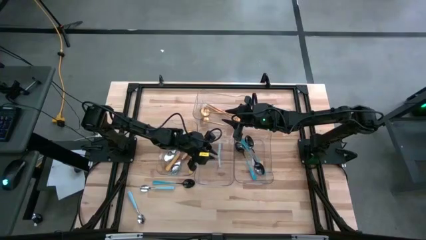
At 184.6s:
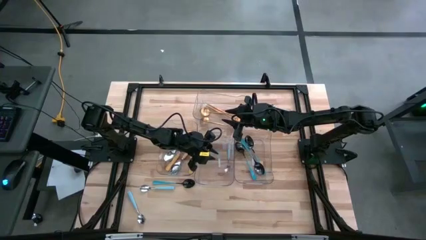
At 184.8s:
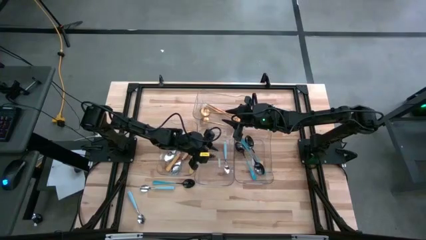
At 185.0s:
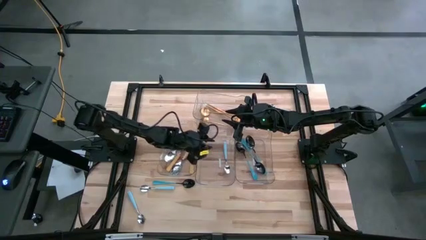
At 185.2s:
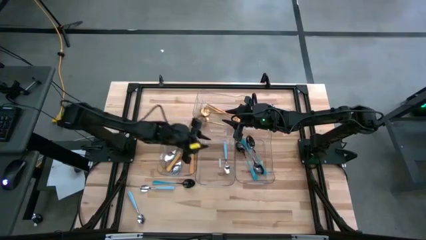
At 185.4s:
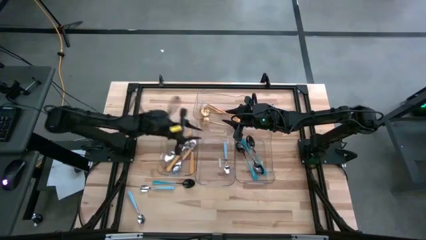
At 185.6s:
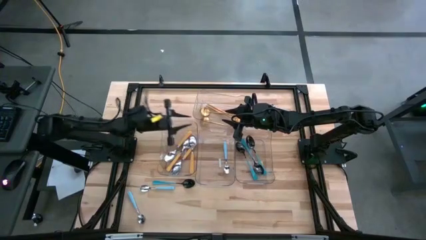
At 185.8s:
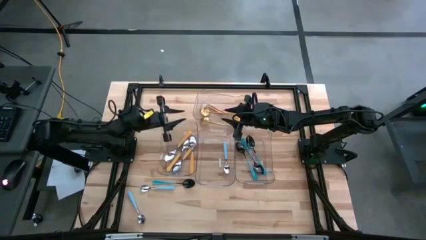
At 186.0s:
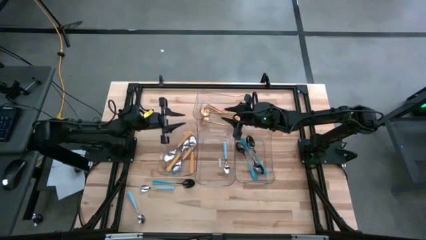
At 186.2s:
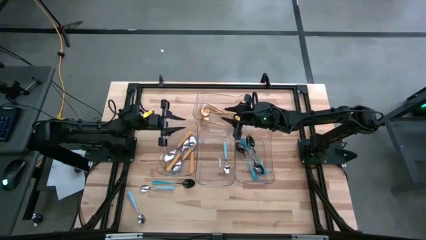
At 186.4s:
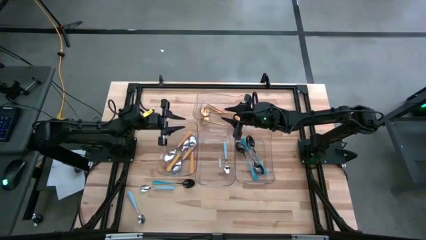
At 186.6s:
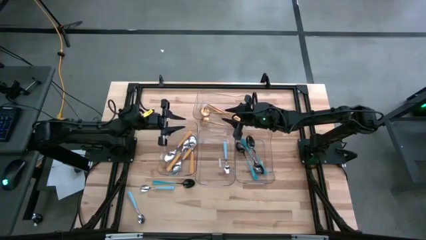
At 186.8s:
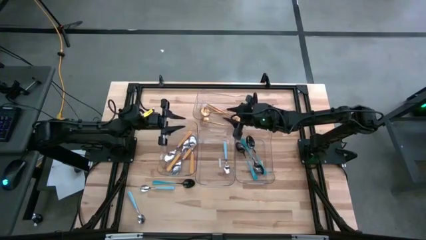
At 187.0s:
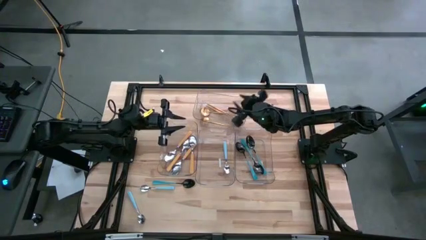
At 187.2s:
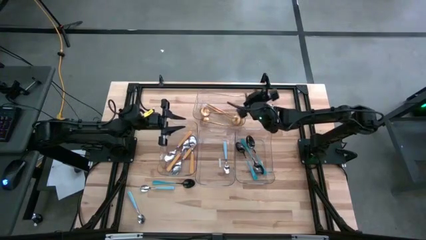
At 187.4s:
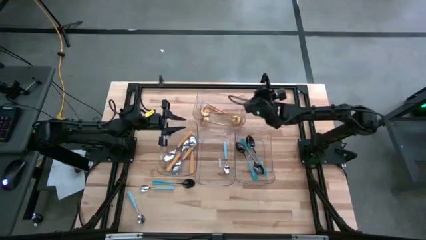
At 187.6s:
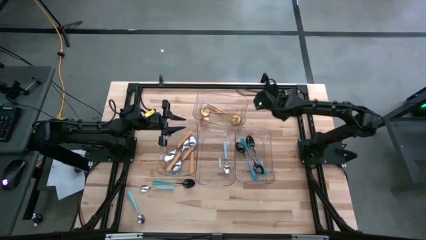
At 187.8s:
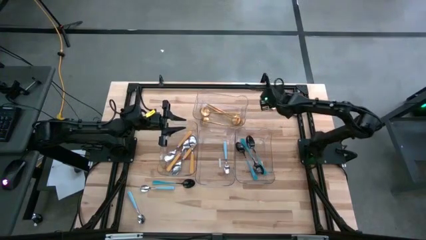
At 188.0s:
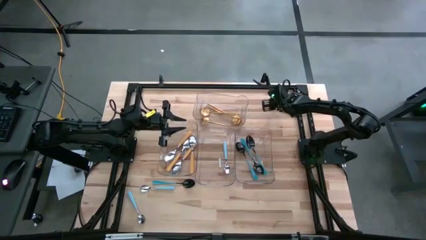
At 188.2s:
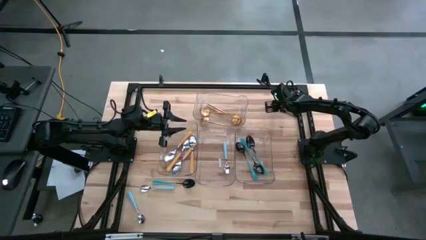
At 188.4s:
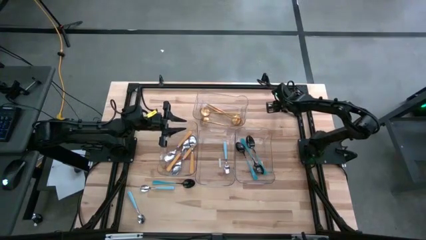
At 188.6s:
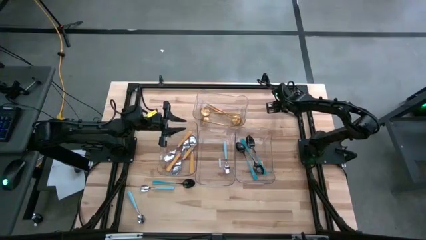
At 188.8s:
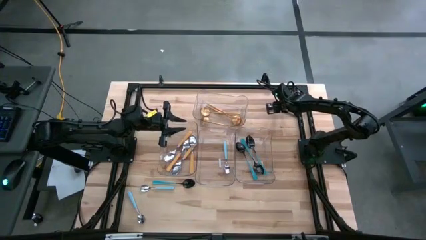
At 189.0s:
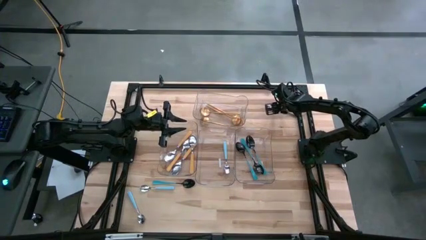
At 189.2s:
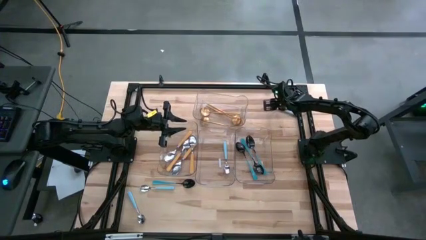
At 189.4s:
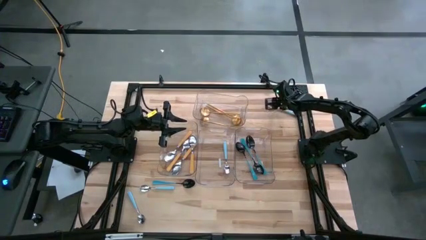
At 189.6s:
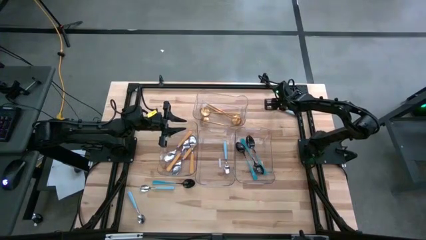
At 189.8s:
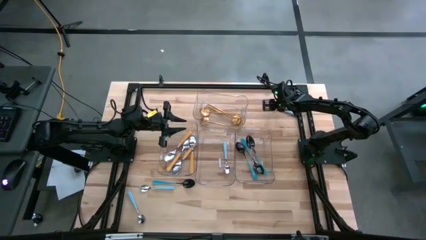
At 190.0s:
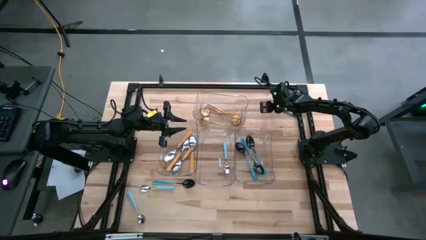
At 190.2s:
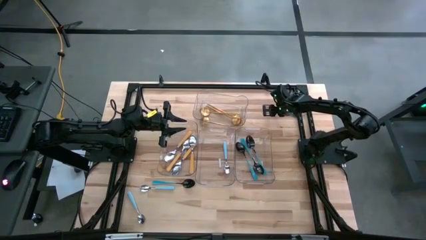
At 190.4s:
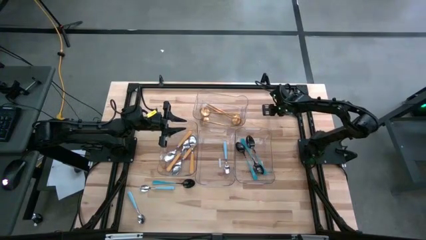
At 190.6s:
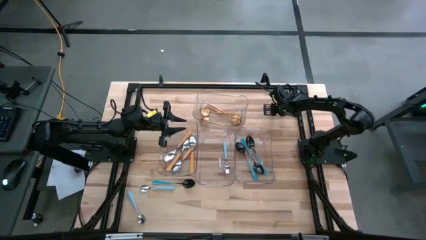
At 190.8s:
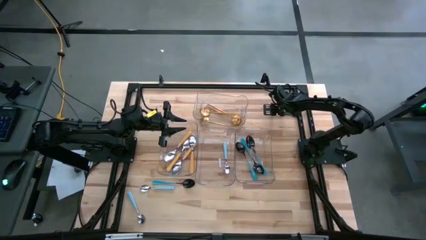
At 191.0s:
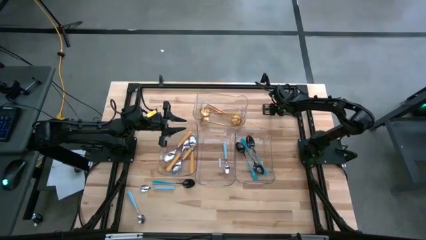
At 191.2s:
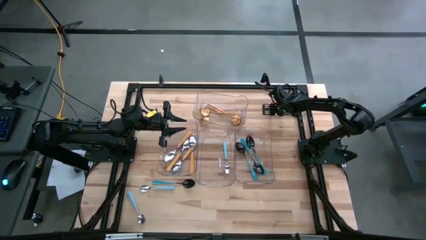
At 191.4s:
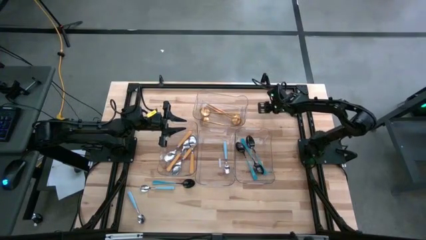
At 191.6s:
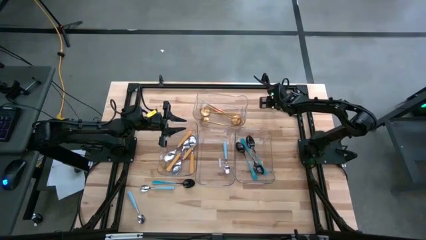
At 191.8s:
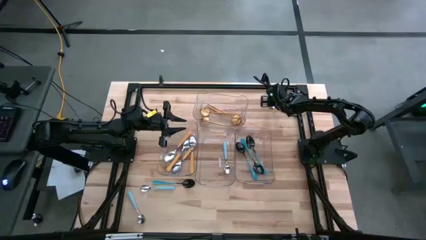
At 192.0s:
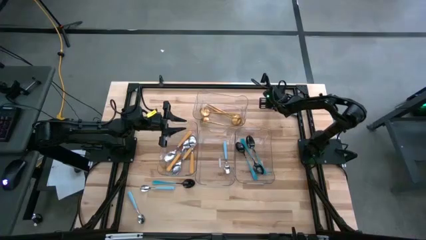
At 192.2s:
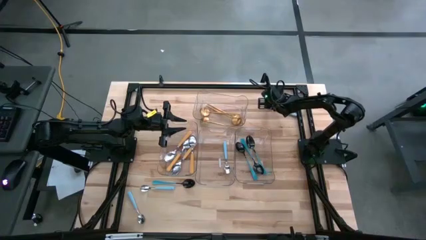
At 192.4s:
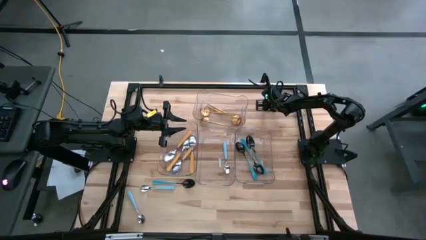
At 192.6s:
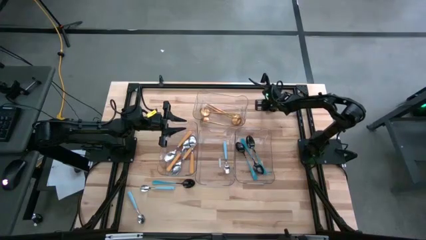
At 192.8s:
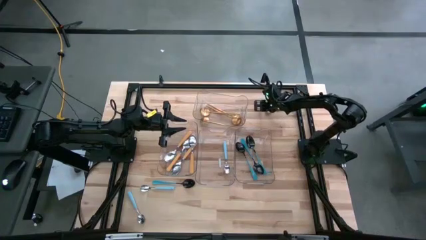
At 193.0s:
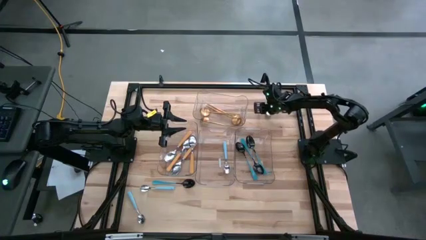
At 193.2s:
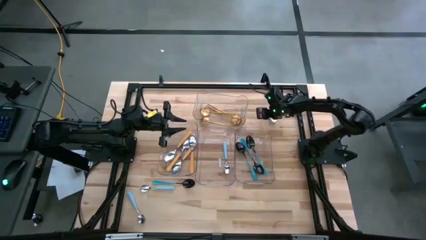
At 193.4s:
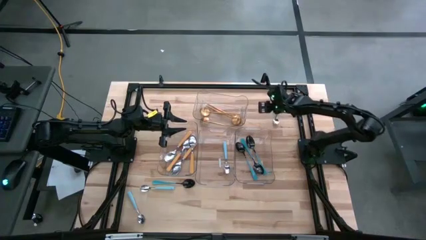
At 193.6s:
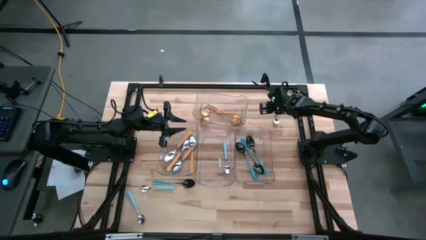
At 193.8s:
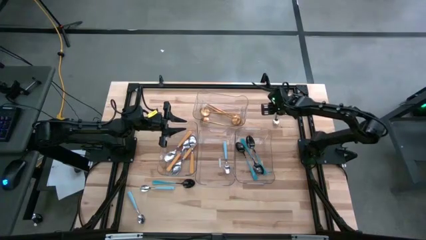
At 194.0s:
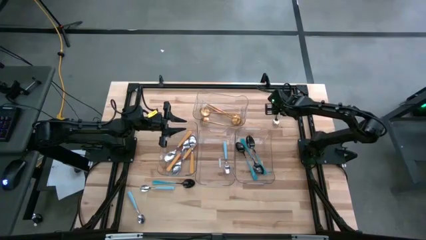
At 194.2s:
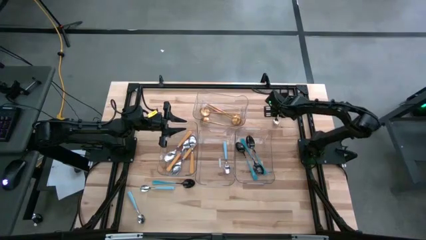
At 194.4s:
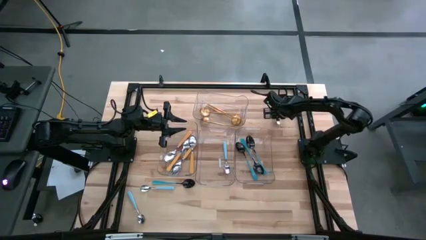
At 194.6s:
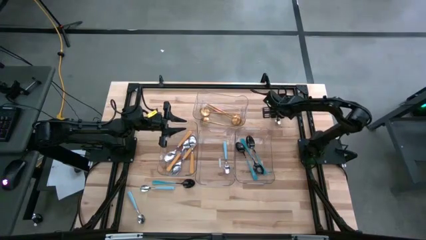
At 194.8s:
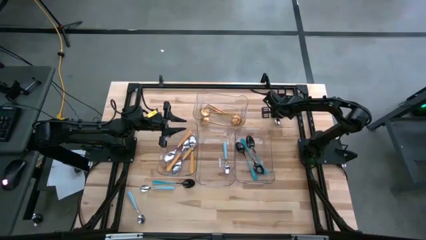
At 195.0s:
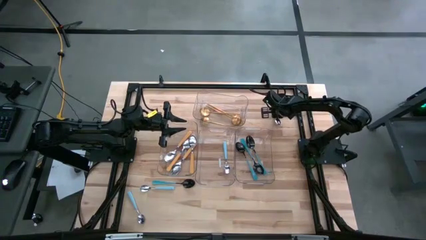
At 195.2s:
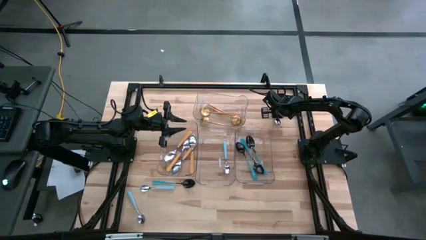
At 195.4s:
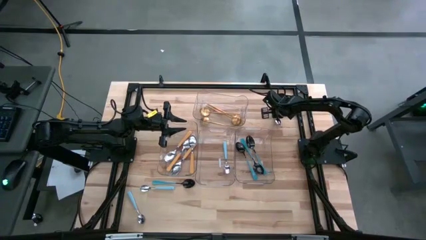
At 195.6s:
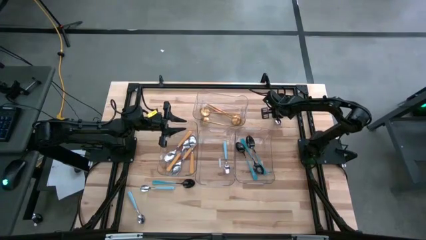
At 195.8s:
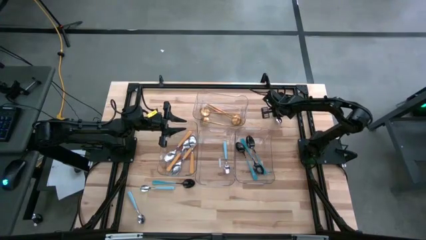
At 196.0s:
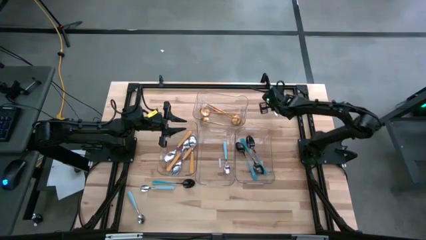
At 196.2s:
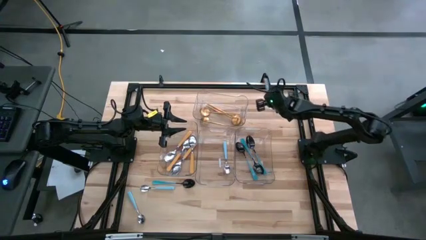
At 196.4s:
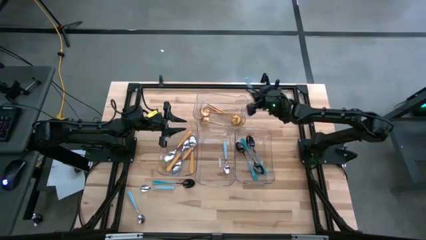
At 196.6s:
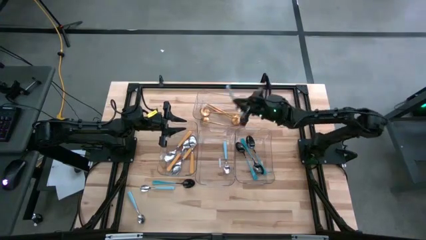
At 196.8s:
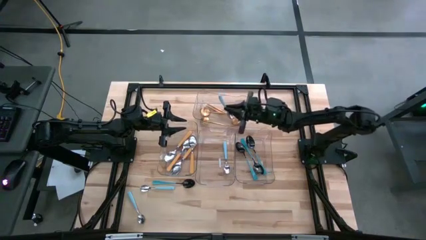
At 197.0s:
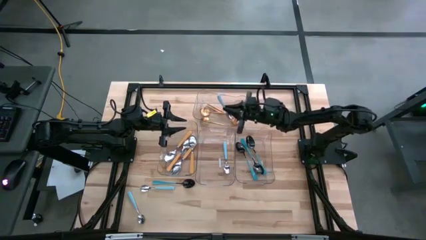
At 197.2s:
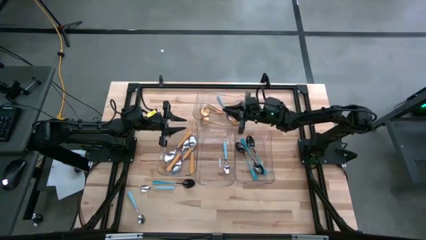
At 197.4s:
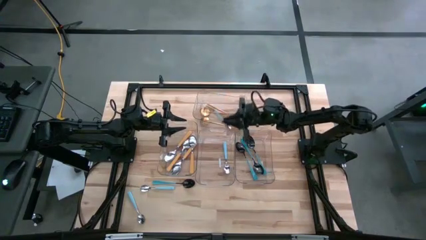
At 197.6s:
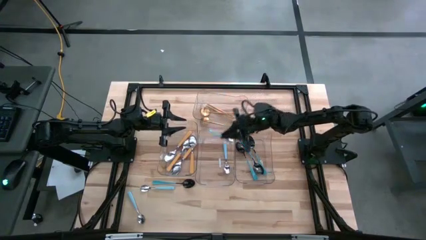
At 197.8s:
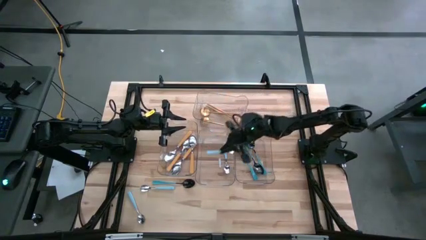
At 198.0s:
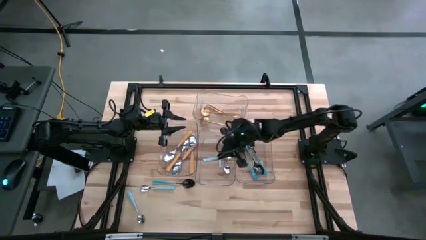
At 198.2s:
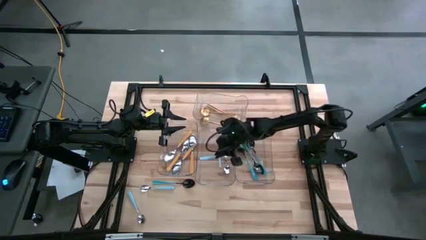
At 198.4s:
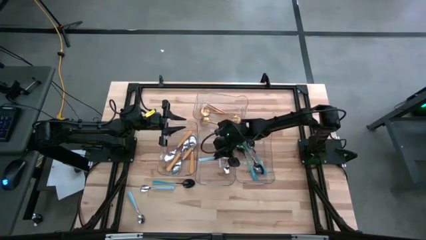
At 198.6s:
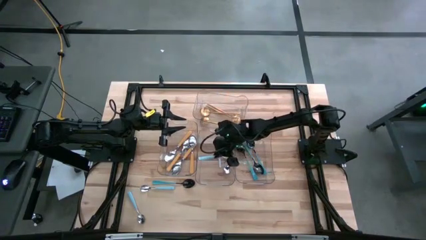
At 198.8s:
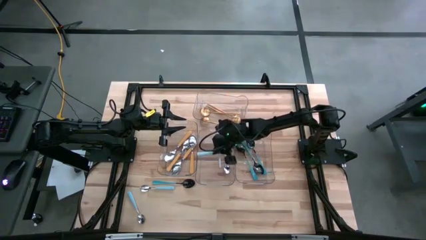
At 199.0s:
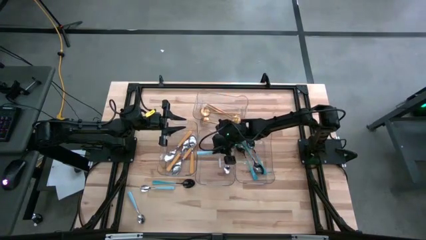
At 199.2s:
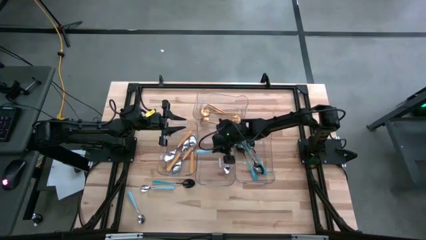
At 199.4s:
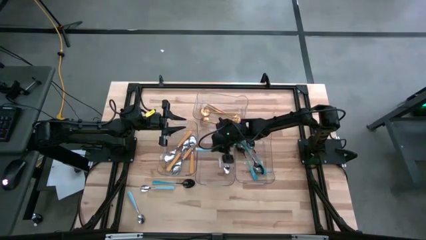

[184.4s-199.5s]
Task: Sort silverware by color (type)
Put the light blue spoon into the middle transparent bin

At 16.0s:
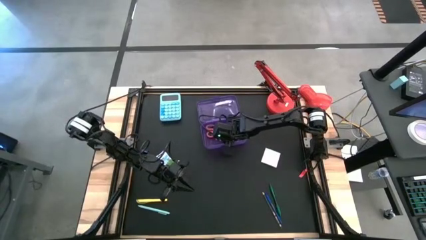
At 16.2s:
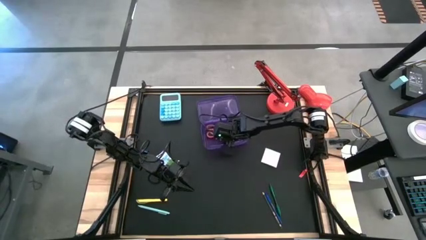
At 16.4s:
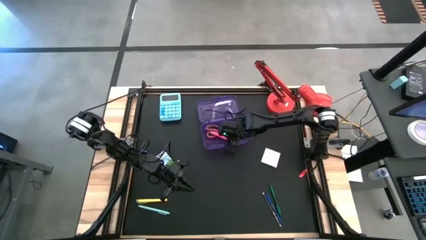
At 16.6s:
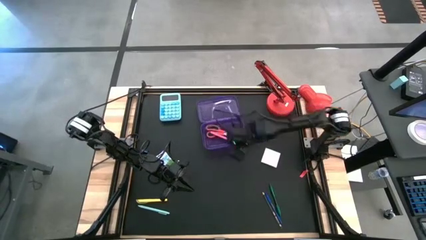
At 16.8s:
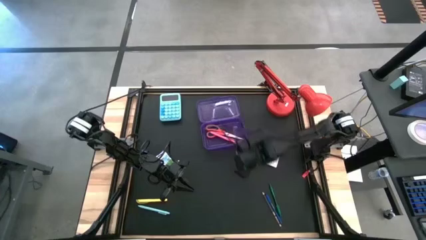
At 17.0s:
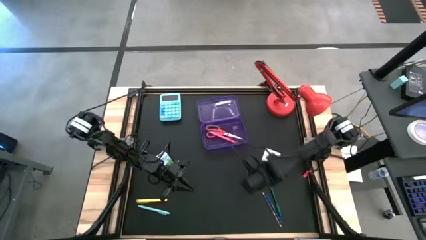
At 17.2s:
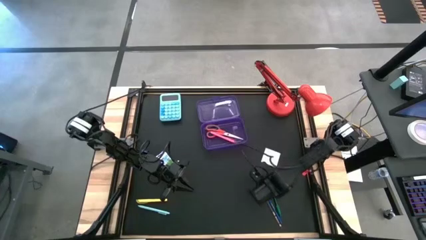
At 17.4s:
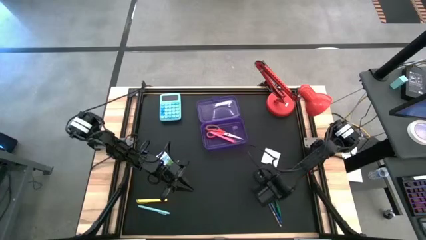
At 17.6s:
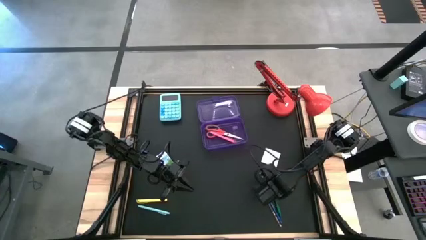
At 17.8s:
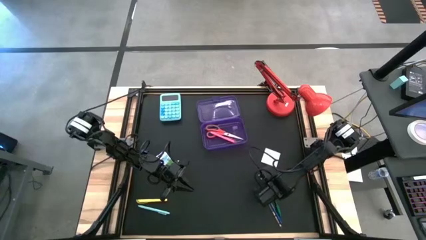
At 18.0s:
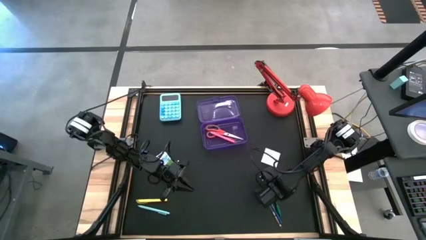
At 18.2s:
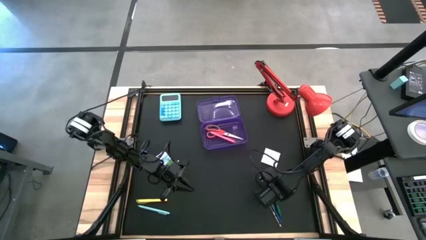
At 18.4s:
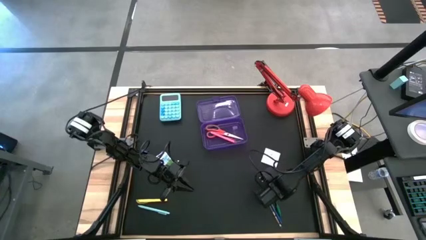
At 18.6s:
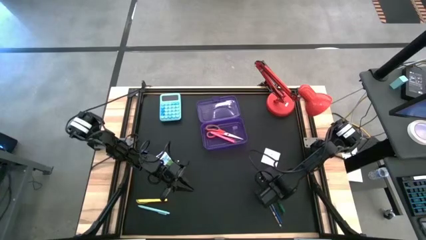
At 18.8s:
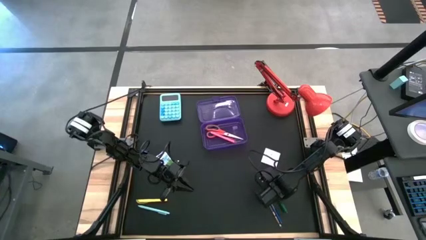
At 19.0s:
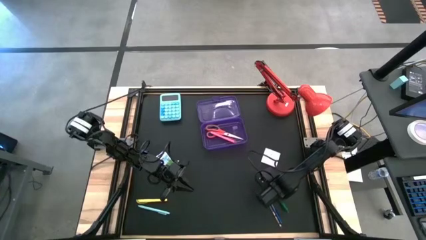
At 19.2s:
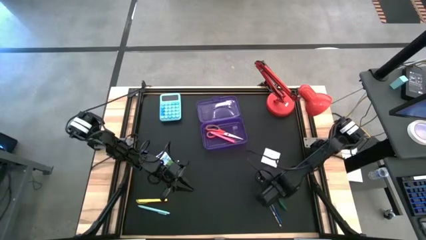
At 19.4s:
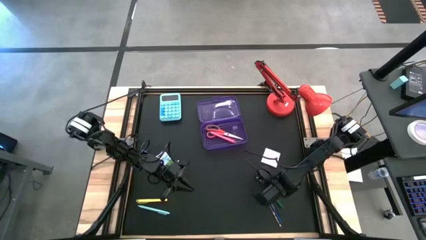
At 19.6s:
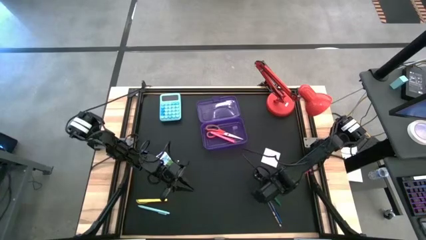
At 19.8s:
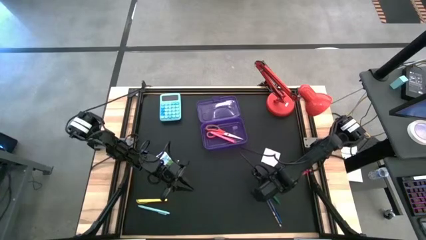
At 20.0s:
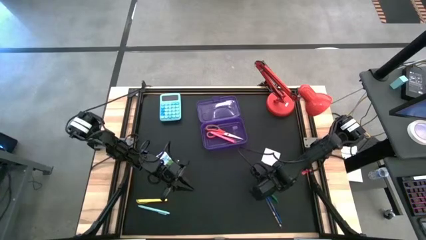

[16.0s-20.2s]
Task: Pack school essentials
Put the green pen into the violet supply box
